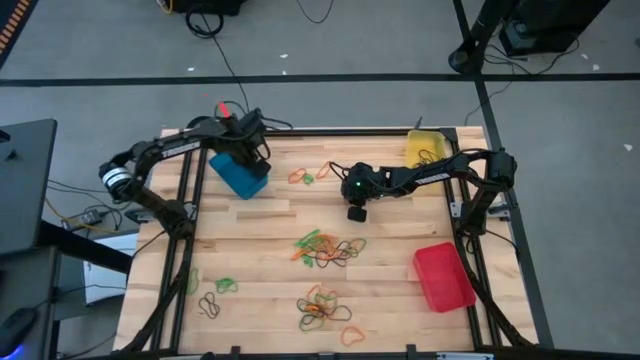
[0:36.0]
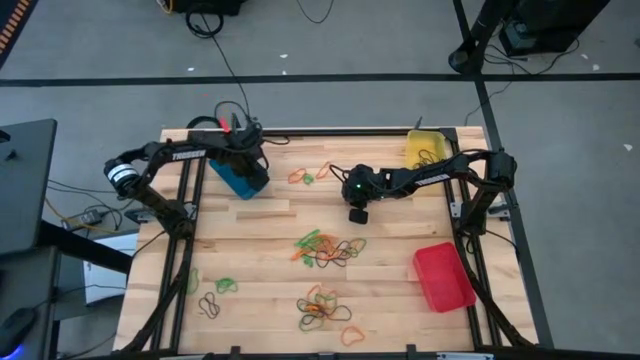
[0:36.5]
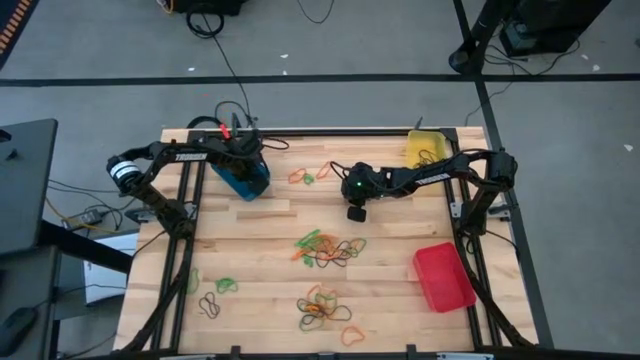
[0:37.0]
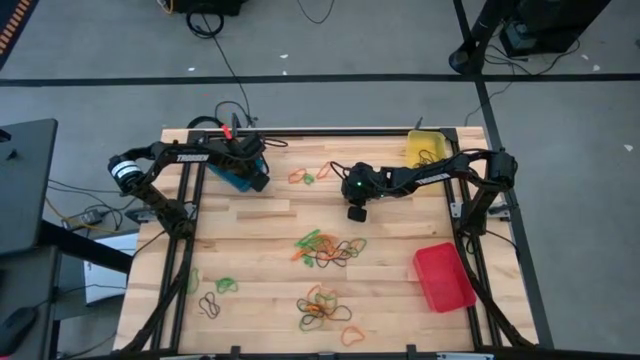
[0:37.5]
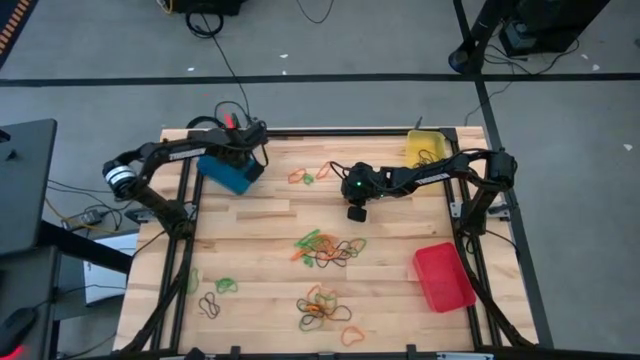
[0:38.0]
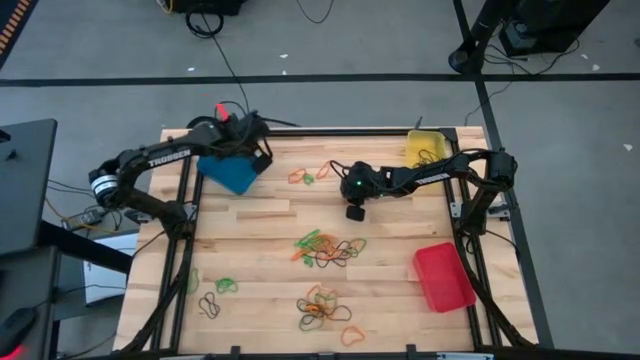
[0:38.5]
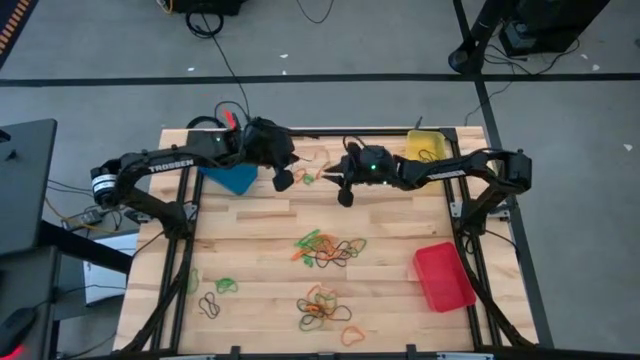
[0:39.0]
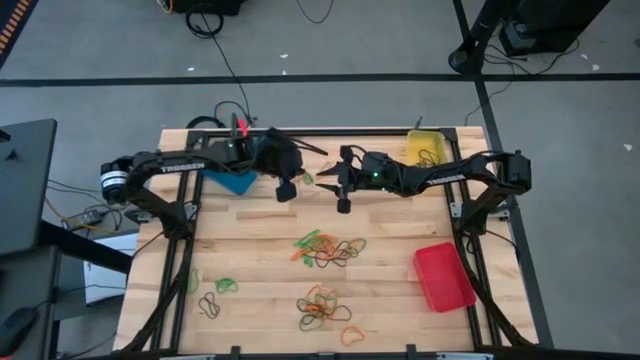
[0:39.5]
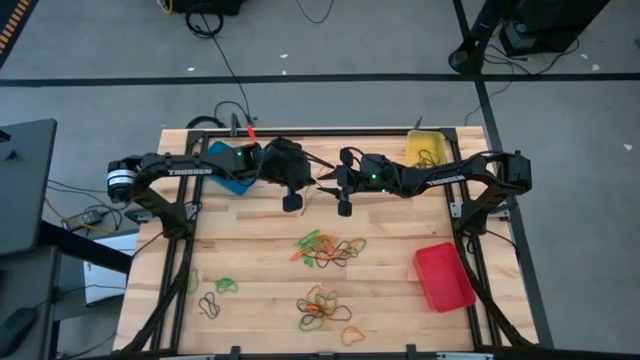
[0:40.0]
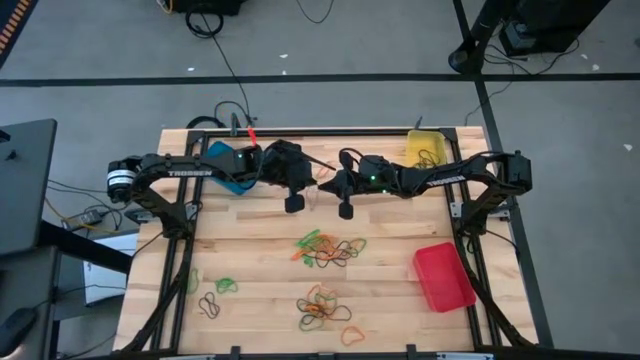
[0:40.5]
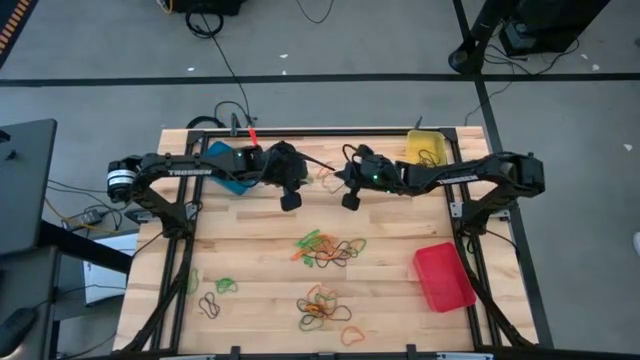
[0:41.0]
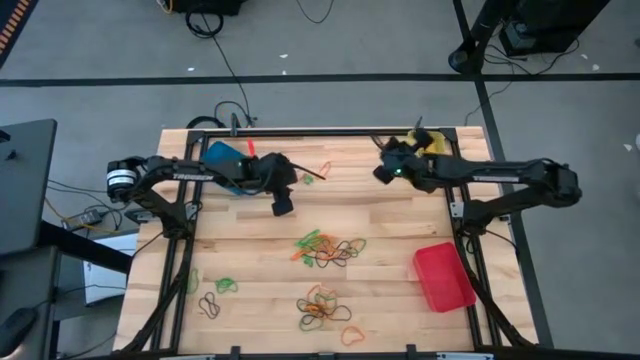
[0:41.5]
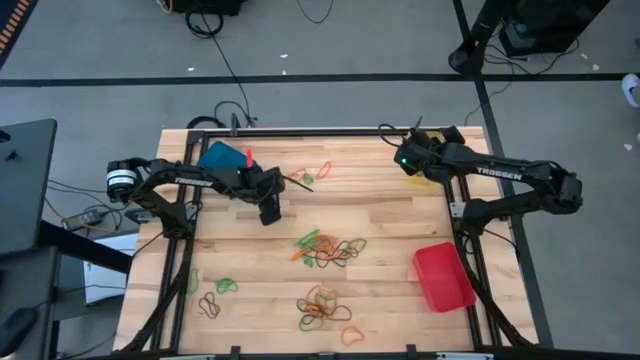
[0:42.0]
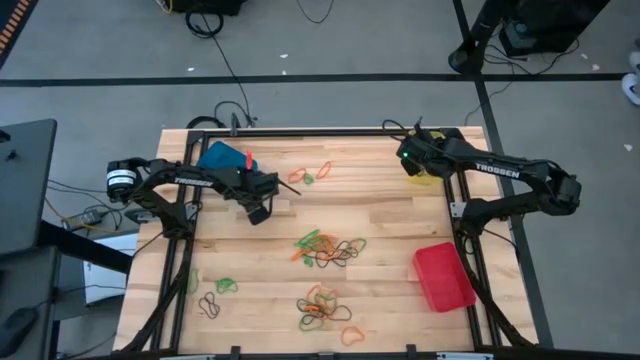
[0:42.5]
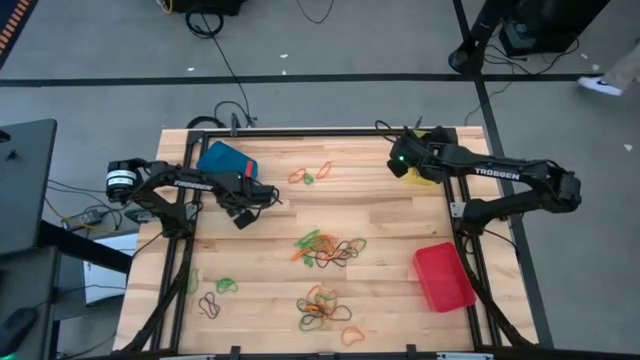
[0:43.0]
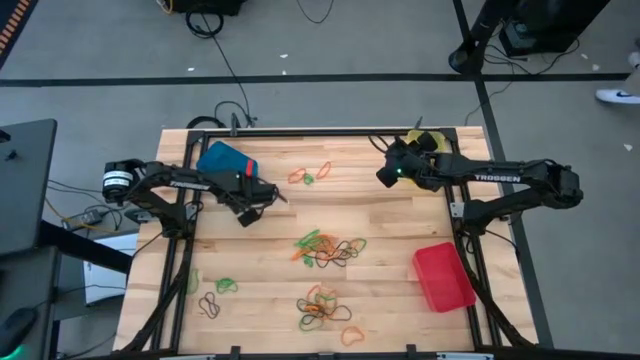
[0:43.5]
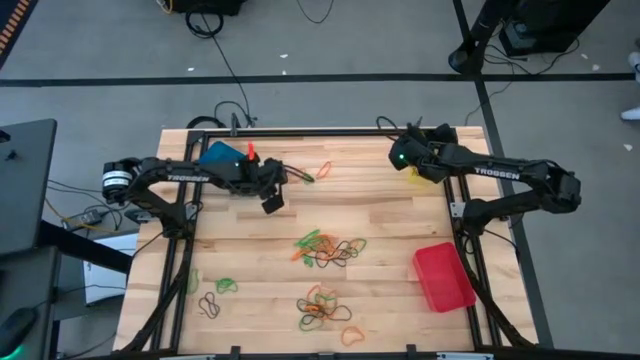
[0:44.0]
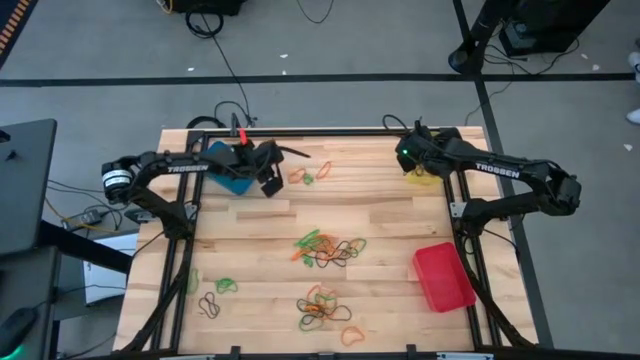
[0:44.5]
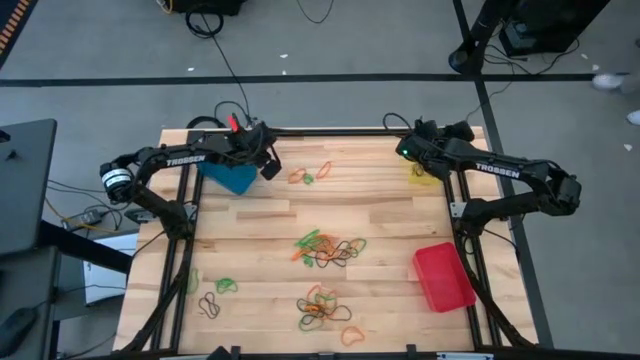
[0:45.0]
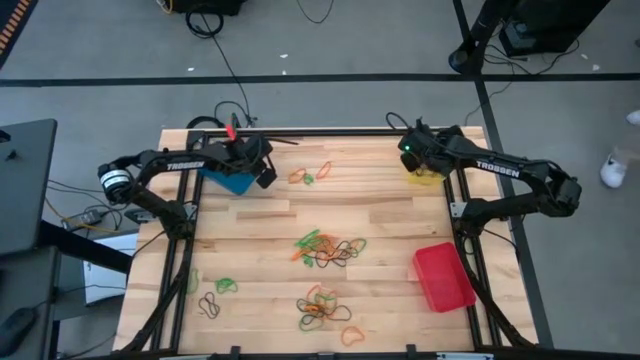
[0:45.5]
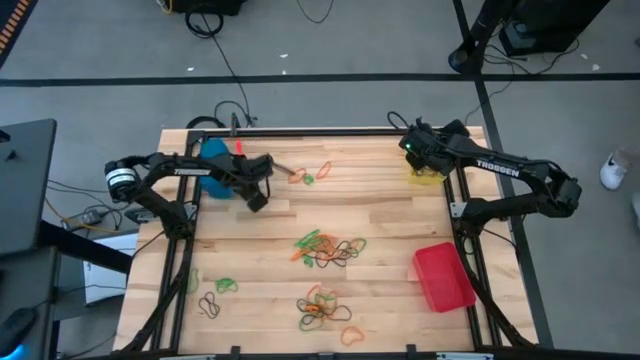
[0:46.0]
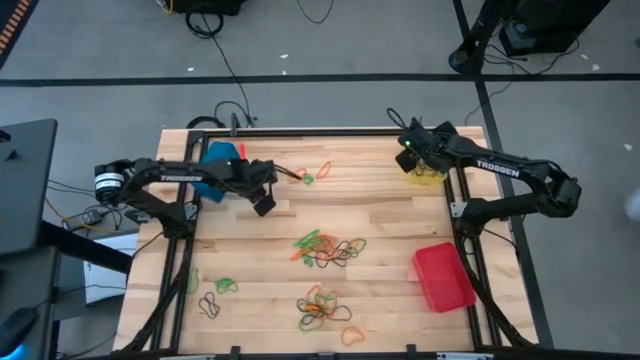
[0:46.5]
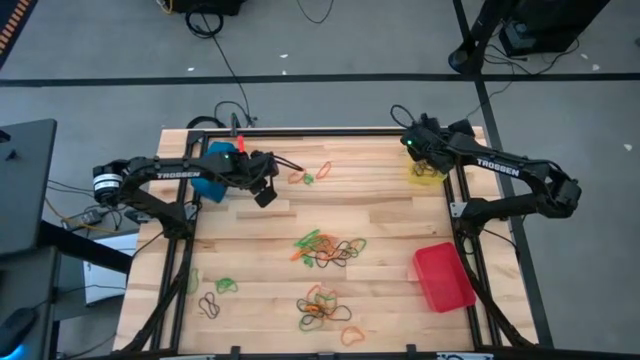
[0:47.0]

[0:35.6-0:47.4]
Task: Sort rubber bands into baskets
Put the brown rubber band into the yellow bin

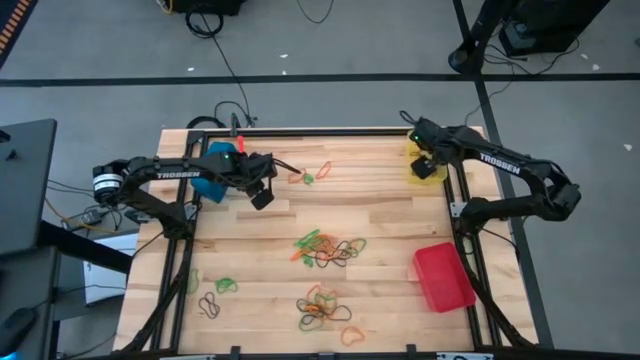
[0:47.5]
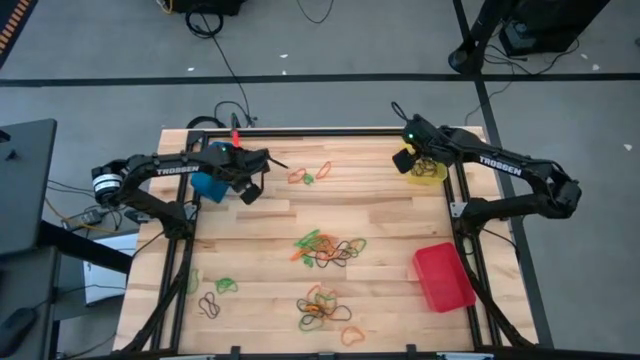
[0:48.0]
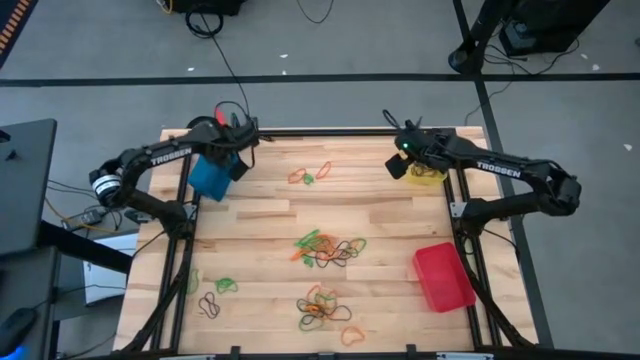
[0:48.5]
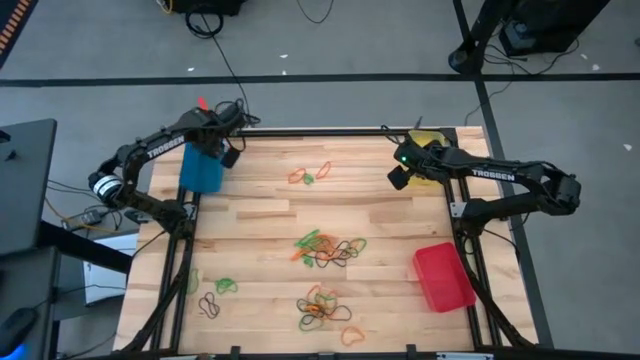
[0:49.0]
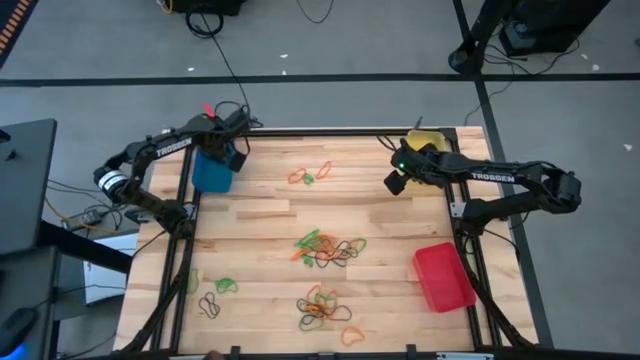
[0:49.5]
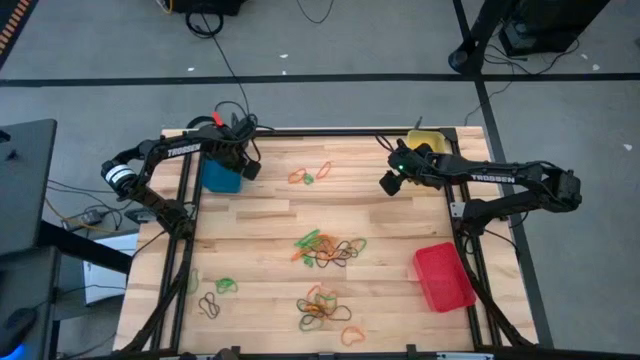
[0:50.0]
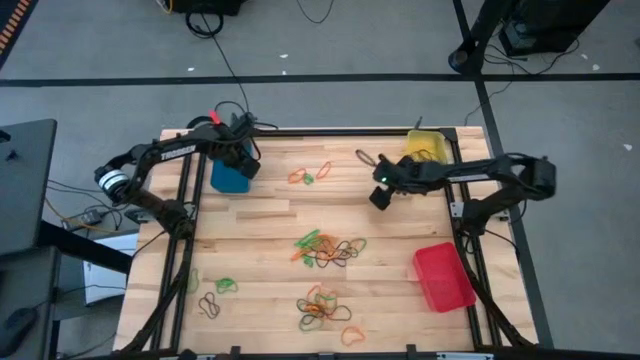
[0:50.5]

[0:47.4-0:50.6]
Adjust the blue bin

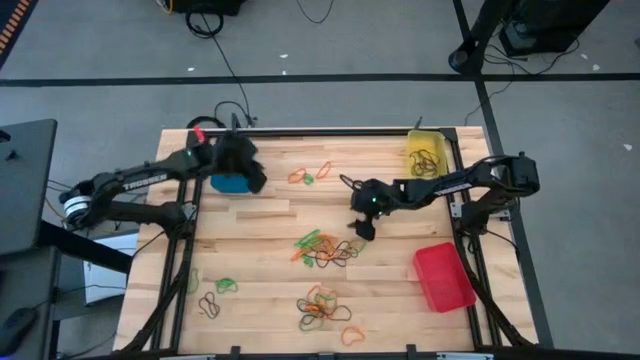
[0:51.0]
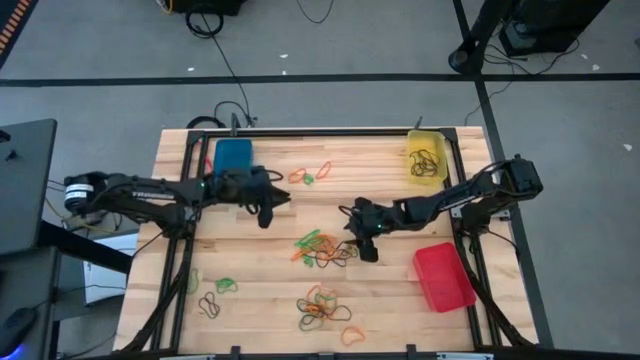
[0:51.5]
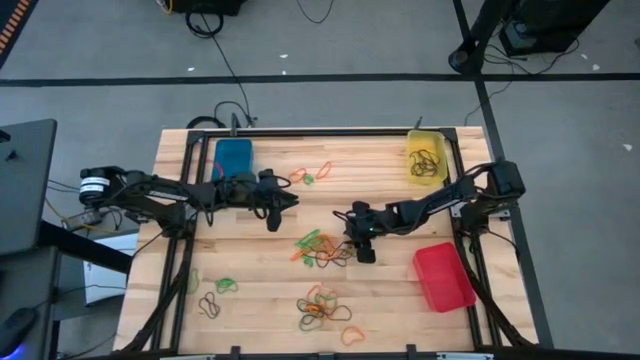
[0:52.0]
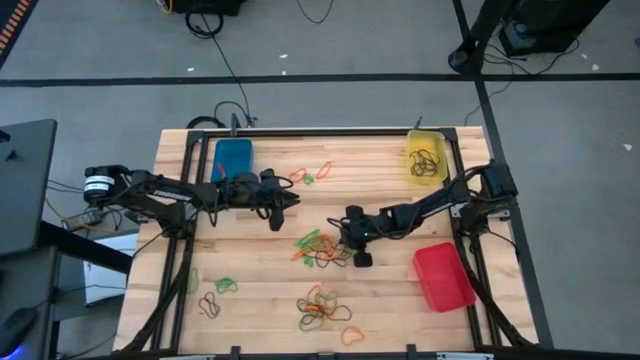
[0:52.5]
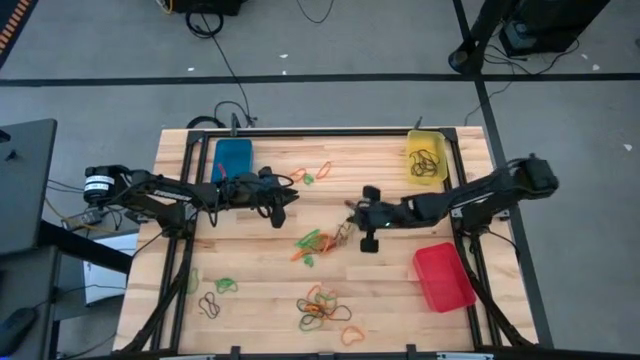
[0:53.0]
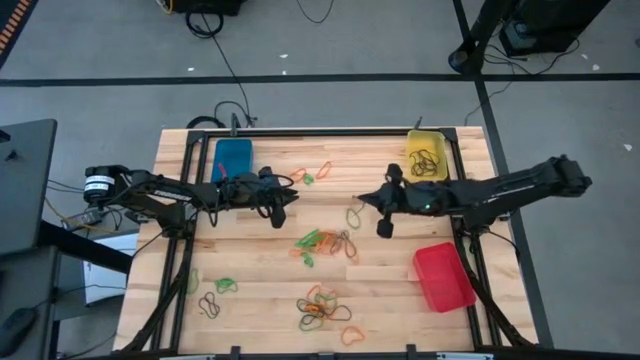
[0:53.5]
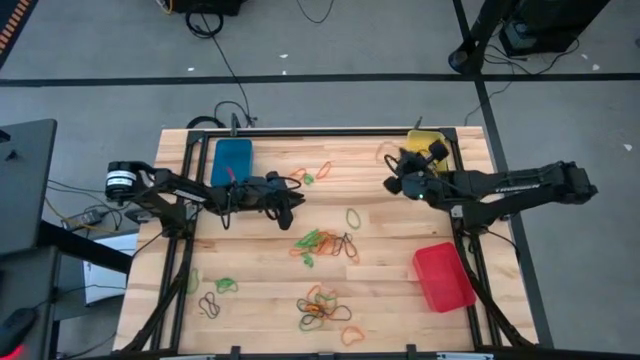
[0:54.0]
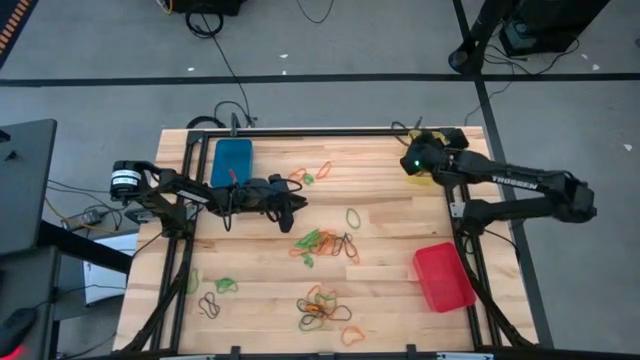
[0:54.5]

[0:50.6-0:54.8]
Put the brown rubber band into the yellow bin

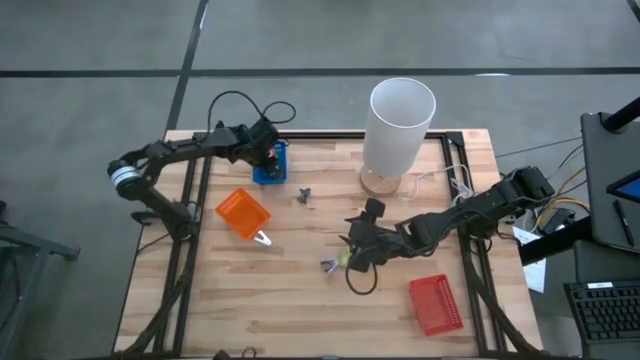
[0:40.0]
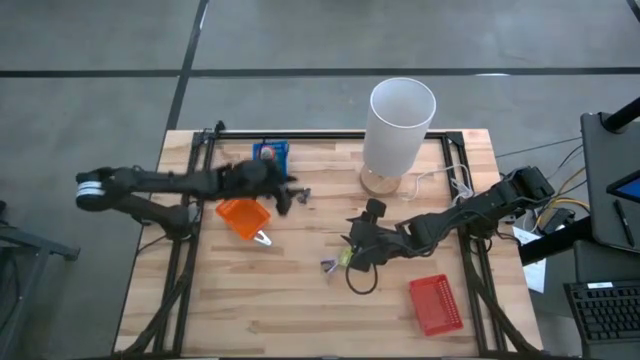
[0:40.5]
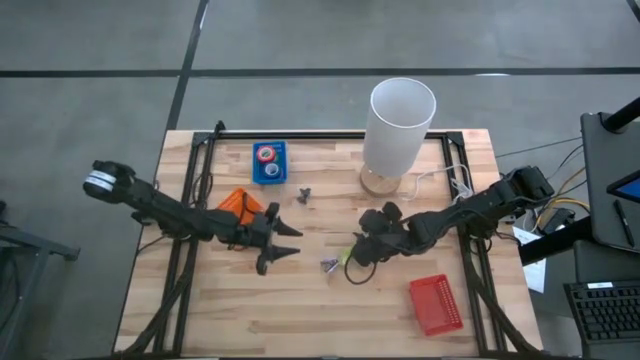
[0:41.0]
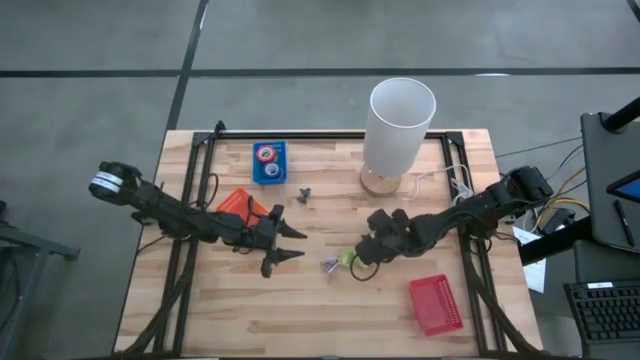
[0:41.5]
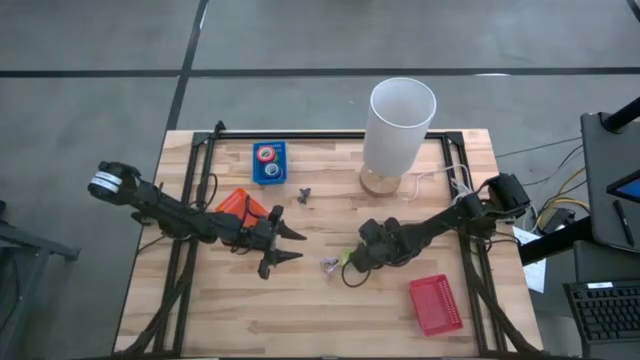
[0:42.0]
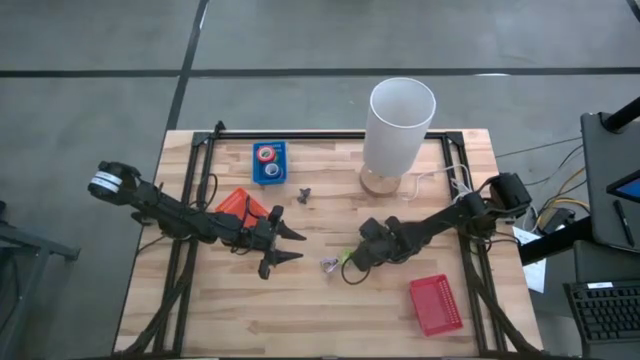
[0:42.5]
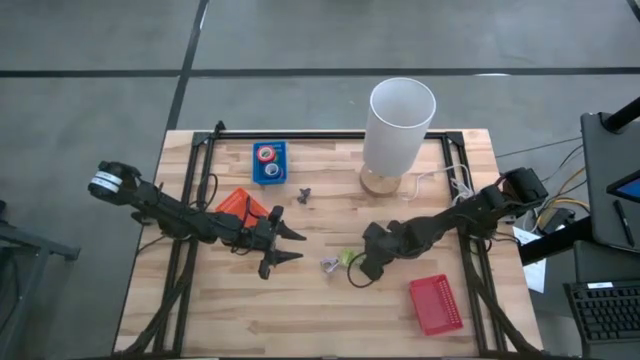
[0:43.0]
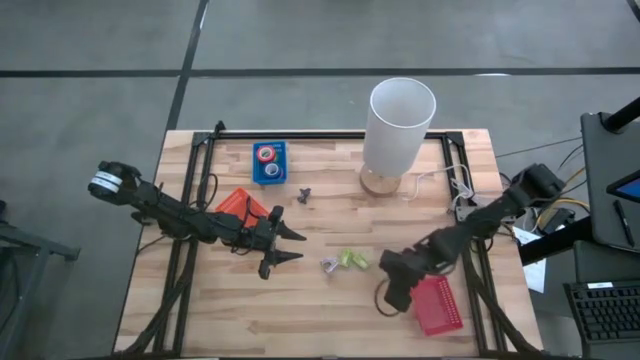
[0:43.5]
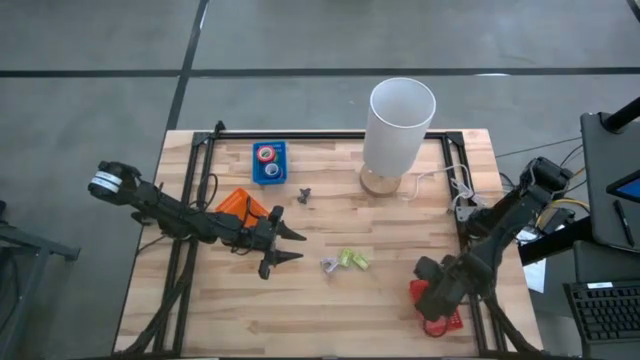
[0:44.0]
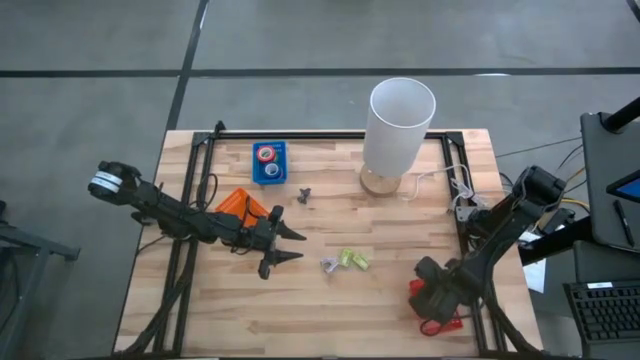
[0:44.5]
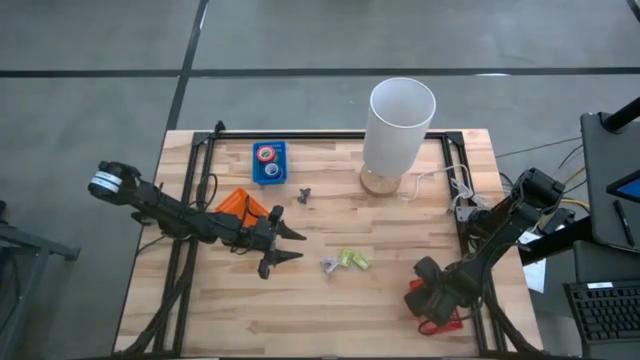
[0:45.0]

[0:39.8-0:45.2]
Task: Pick and place Stapler, Stapler remover, tape
Put the top right green stapler box in the red bin
